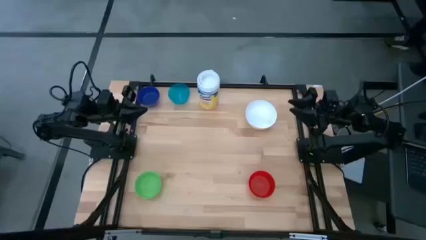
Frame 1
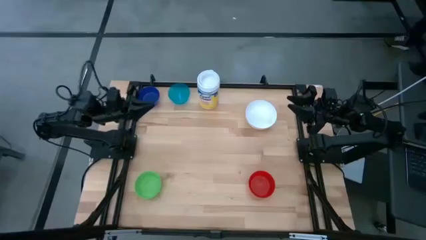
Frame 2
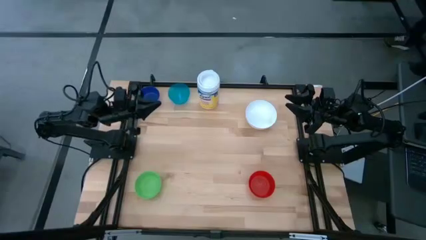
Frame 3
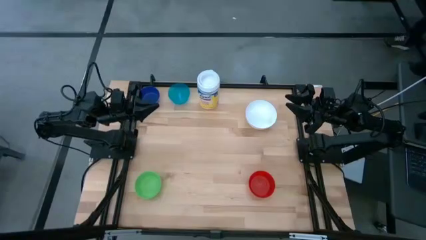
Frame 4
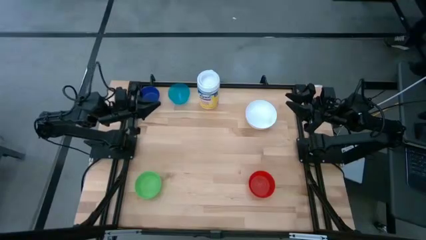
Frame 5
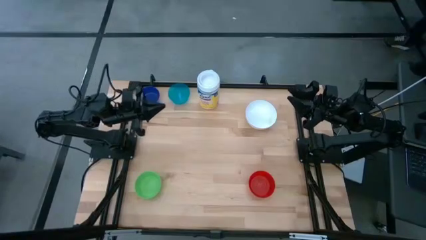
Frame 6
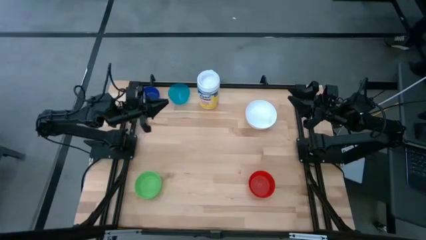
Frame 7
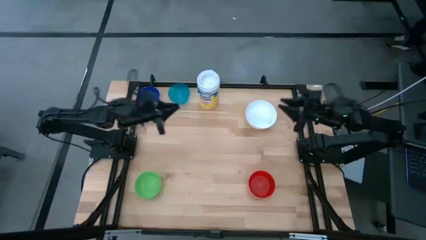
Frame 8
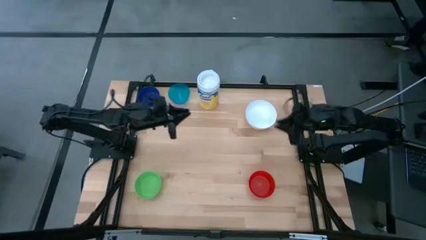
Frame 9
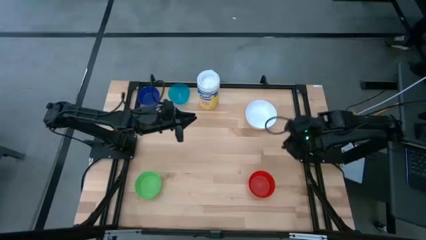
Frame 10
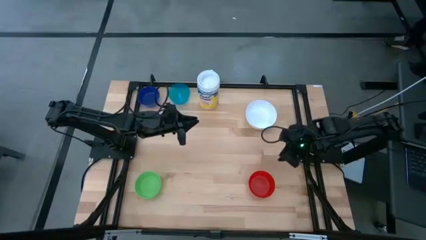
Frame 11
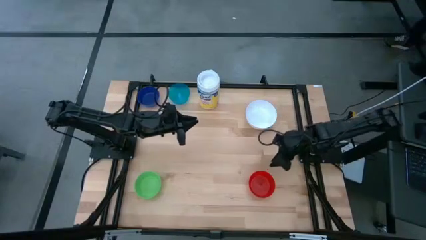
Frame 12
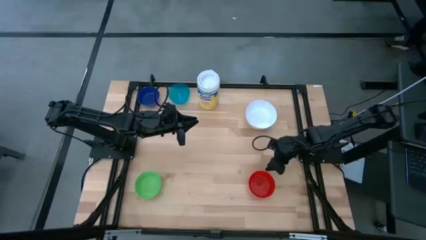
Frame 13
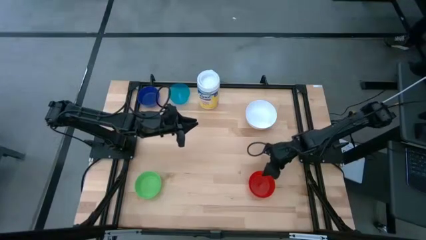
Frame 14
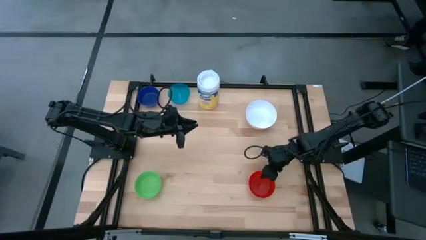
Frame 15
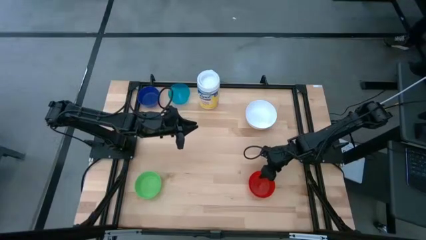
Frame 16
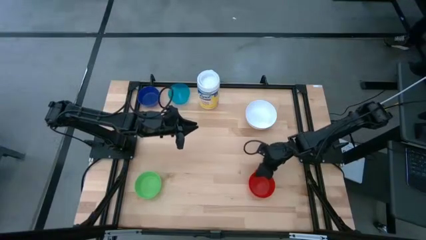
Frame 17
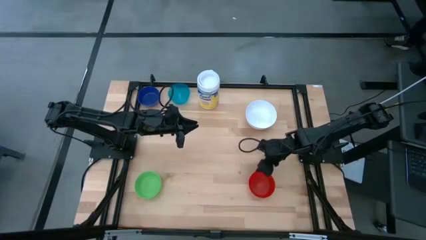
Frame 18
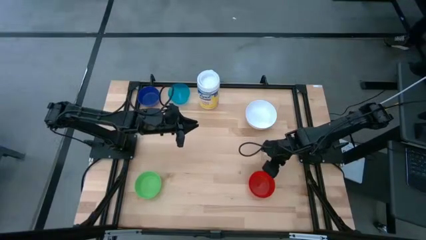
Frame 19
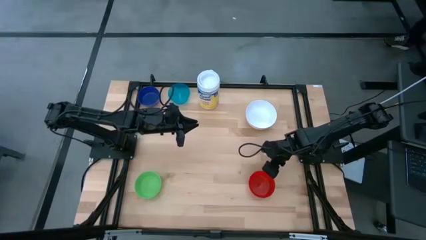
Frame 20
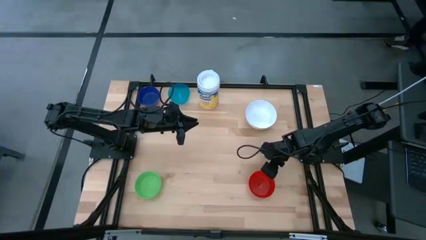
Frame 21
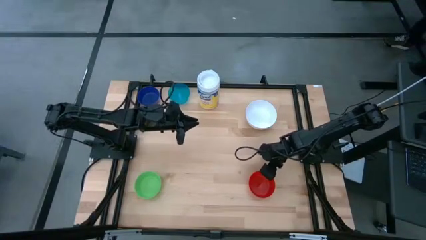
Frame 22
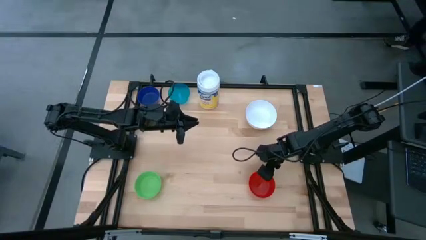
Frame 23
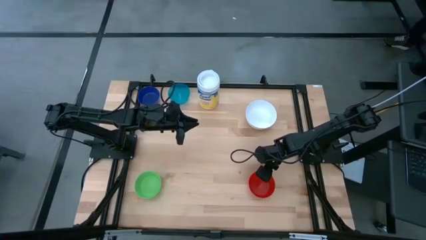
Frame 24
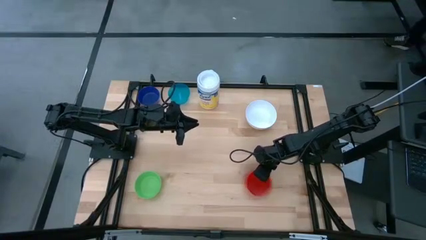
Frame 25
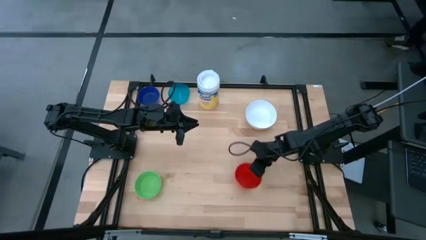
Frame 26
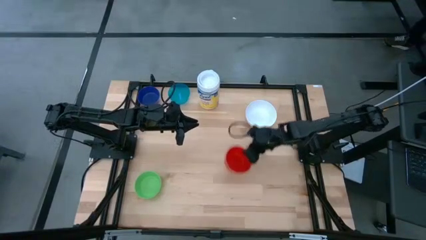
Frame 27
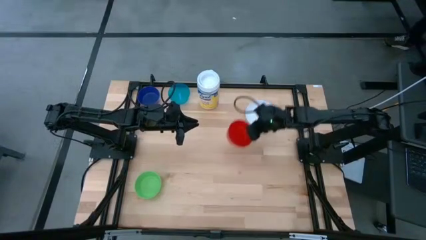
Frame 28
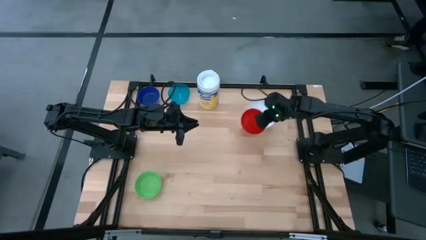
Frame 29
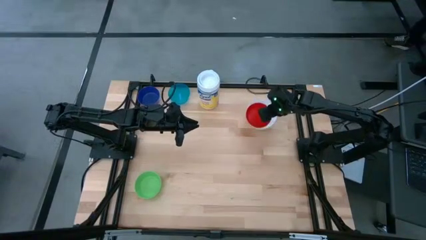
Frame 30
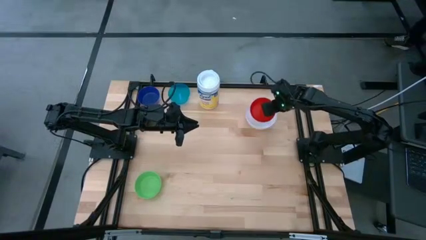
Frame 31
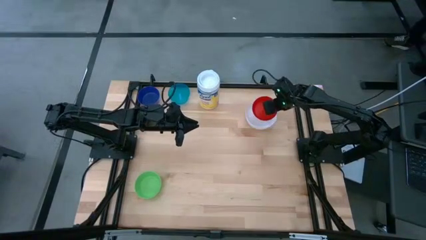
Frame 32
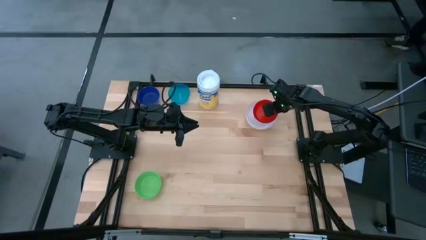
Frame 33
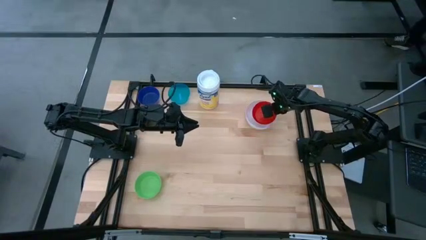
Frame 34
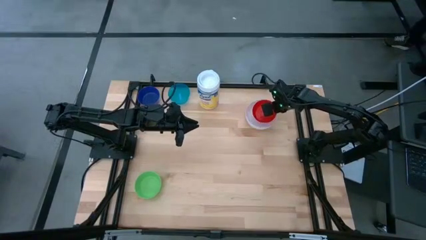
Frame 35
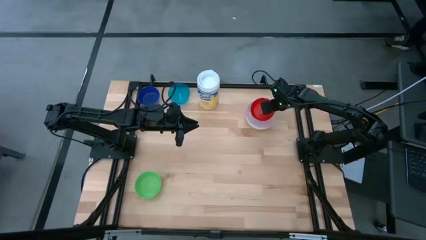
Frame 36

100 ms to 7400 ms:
Stack the red bowl on the white bowl

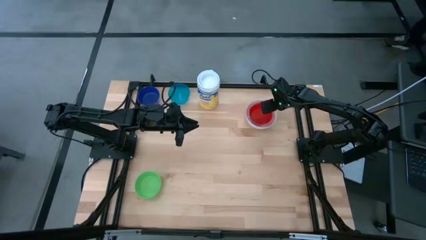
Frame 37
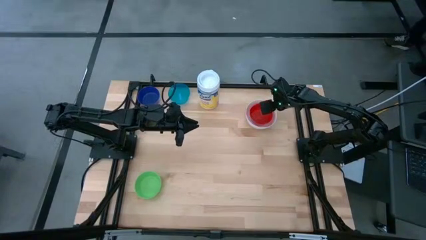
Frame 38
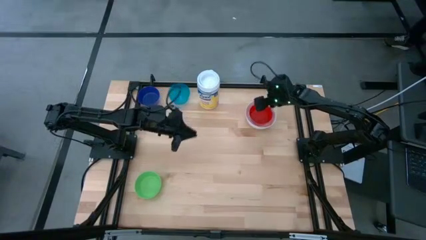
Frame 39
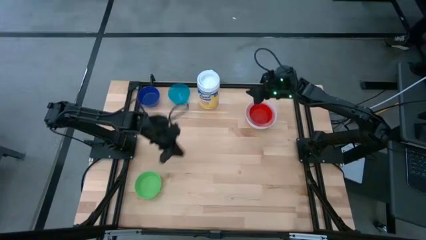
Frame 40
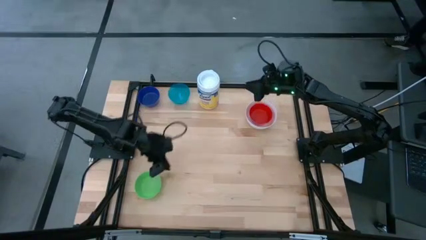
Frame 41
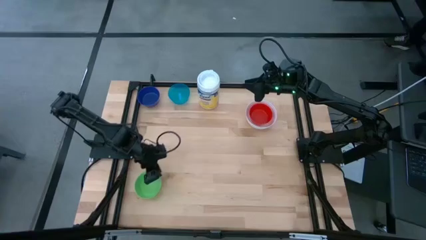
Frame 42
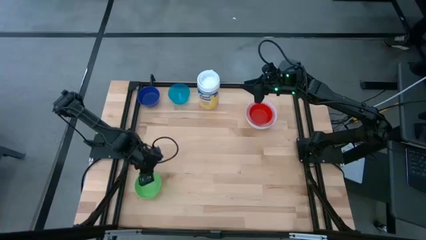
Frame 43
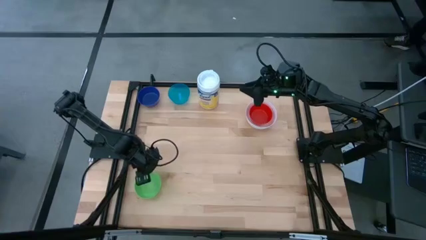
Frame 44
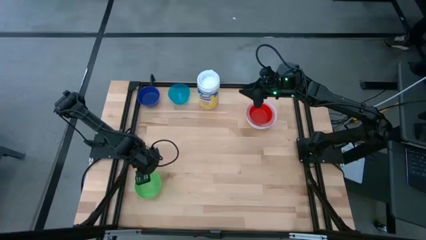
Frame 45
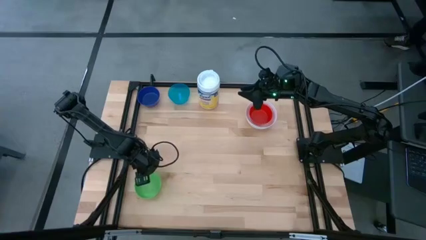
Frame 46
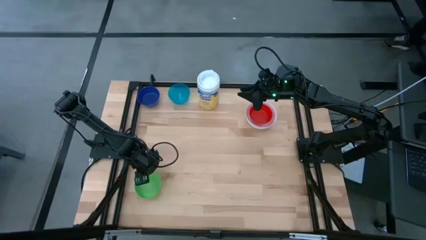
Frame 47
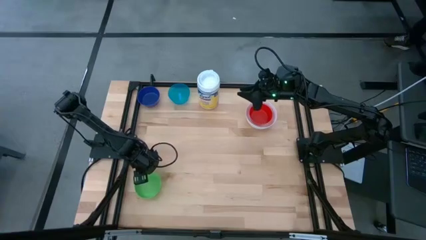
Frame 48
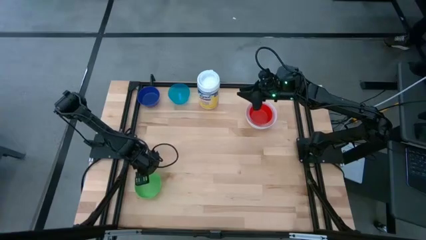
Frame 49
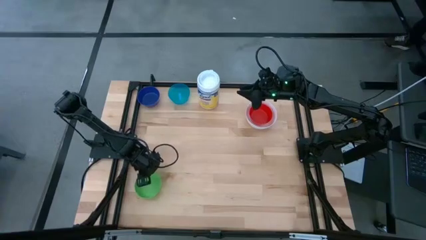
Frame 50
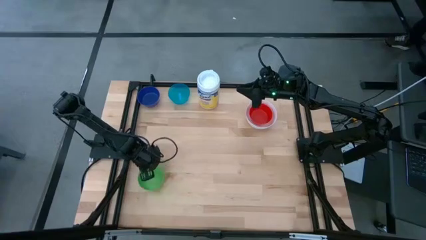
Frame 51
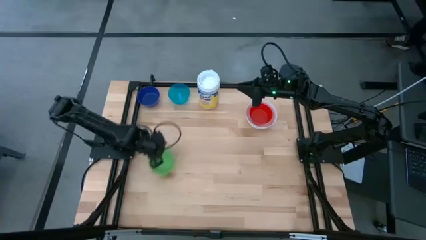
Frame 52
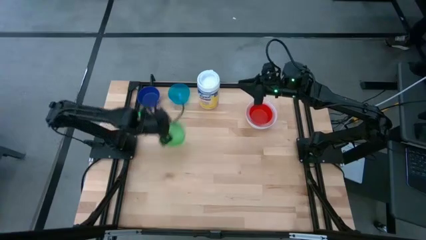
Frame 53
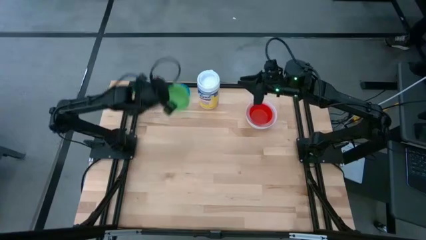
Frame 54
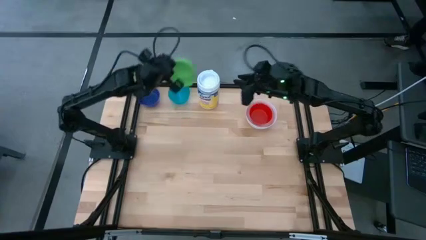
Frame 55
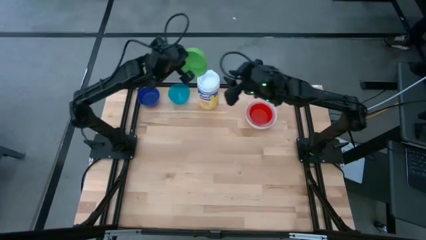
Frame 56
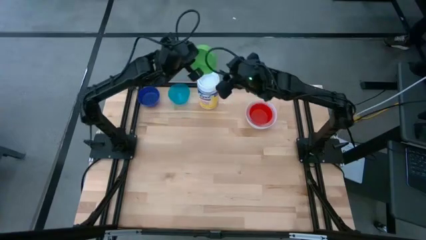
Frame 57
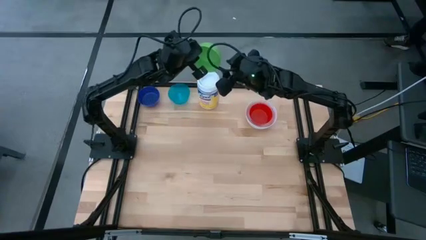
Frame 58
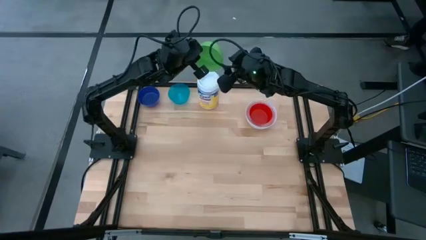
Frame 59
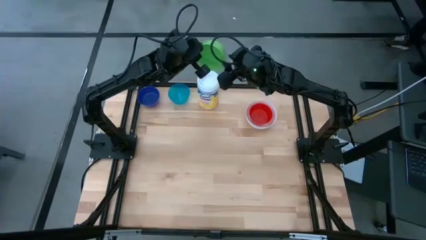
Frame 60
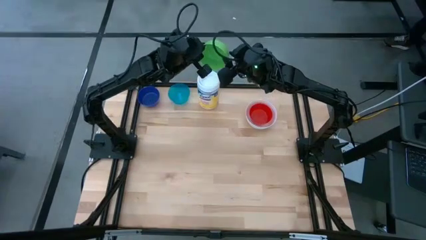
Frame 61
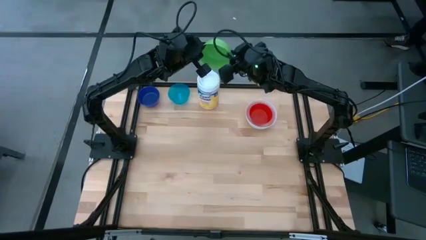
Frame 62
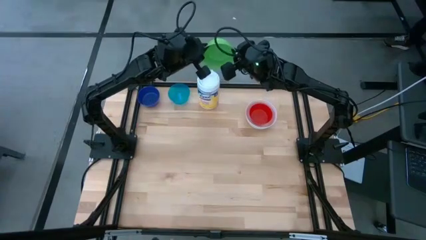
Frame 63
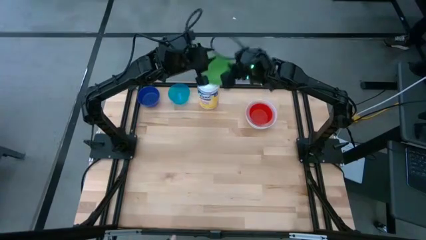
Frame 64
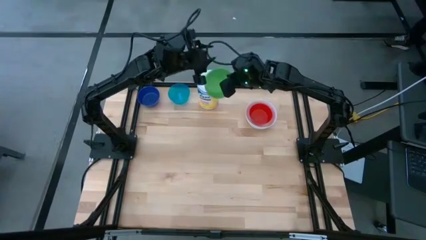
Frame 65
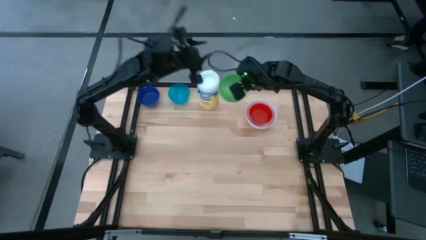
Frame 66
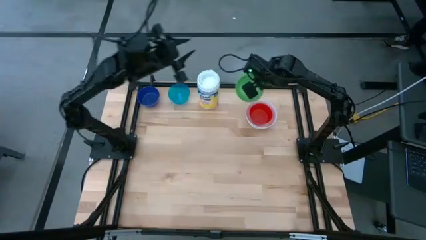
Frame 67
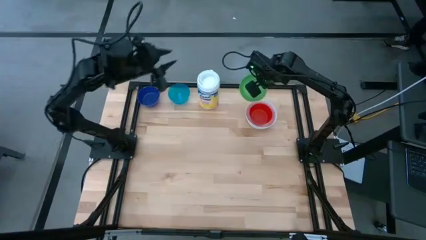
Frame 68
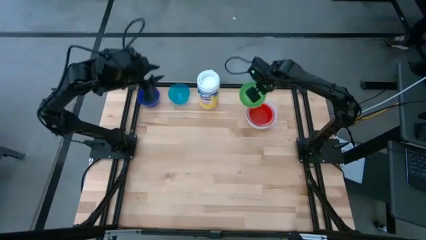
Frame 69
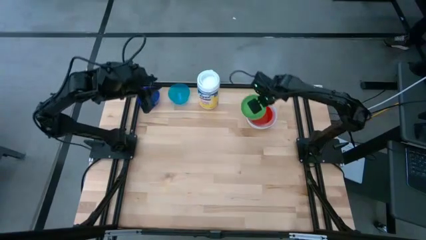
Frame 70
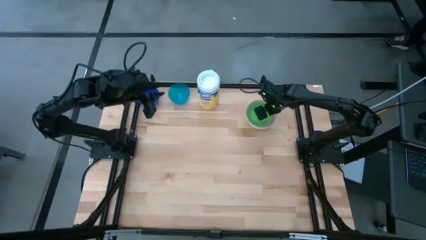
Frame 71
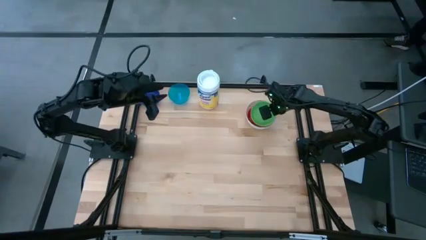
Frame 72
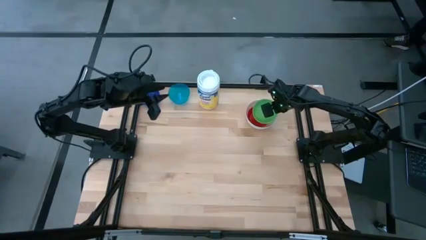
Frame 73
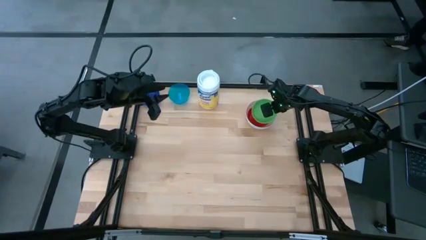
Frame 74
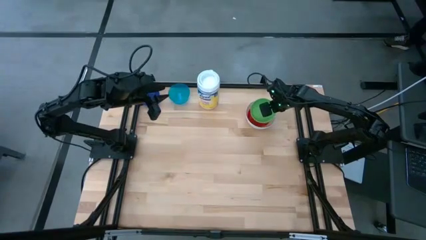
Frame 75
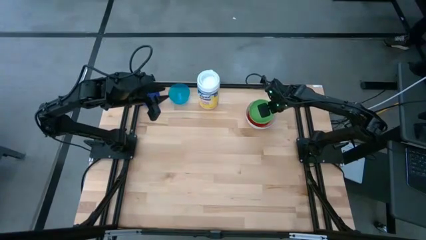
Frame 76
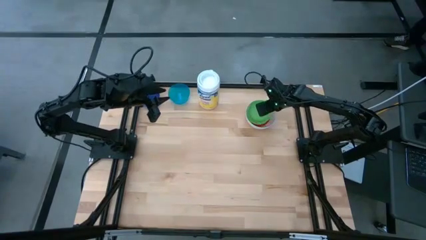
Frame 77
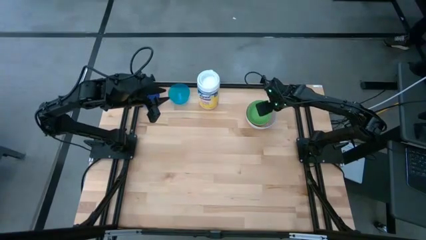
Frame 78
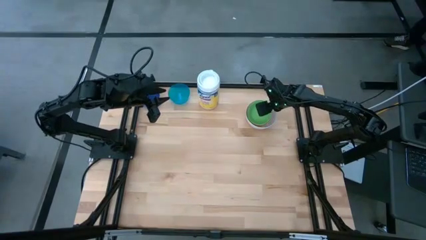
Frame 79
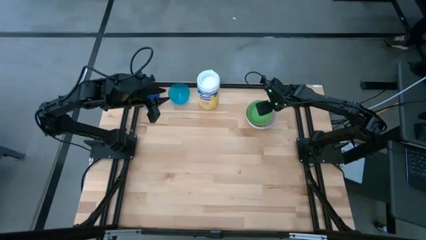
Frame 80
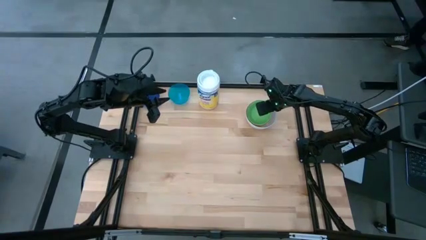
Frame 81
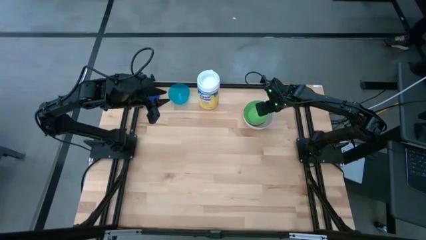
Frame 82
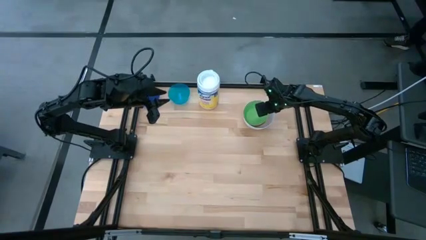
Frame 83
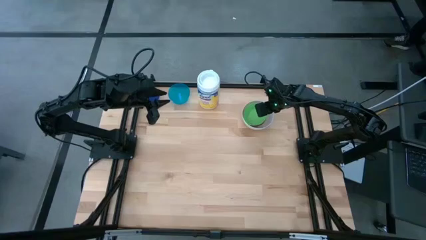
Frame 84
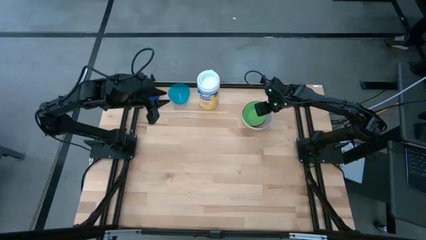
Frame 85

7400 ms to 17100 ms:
Stack the green bowl on the red bowl
